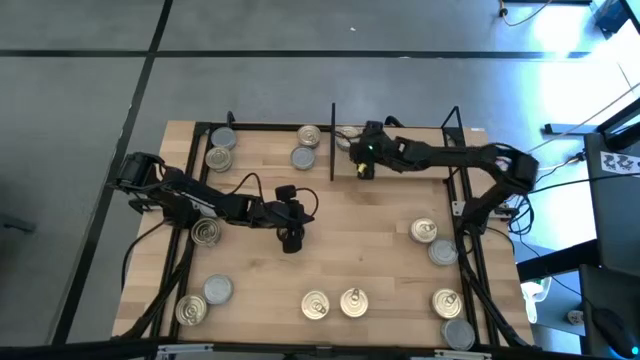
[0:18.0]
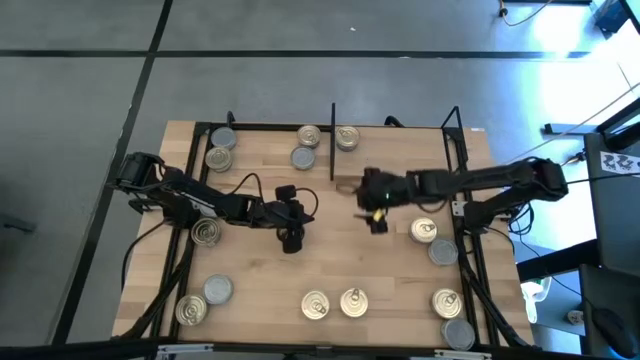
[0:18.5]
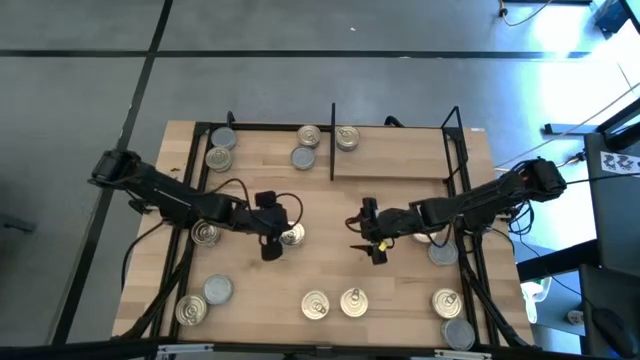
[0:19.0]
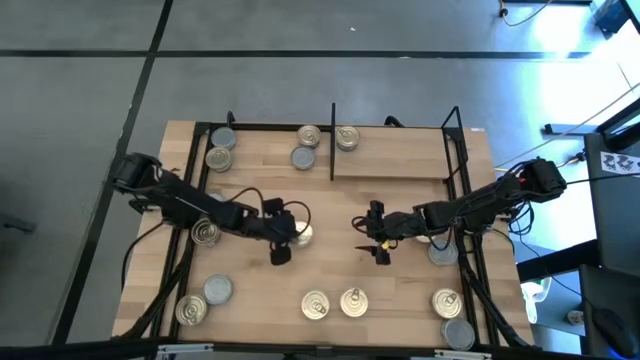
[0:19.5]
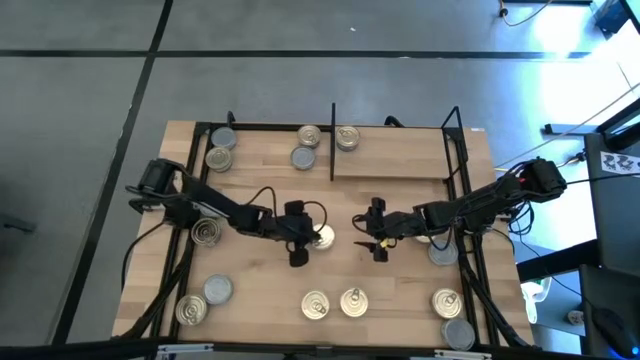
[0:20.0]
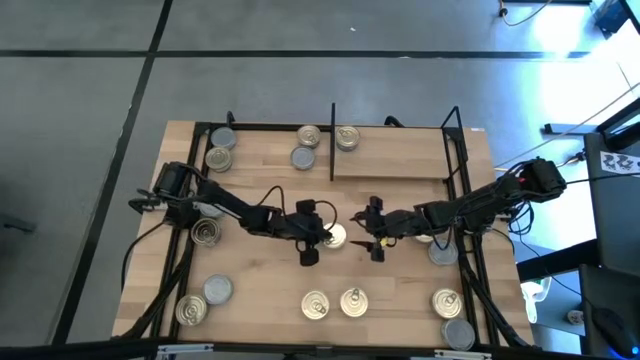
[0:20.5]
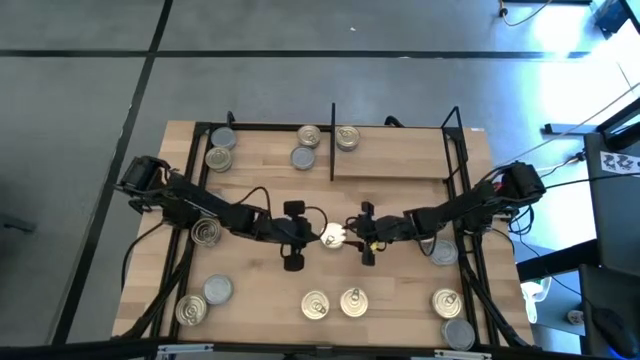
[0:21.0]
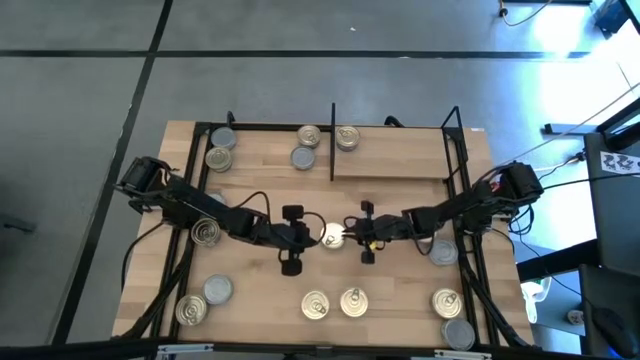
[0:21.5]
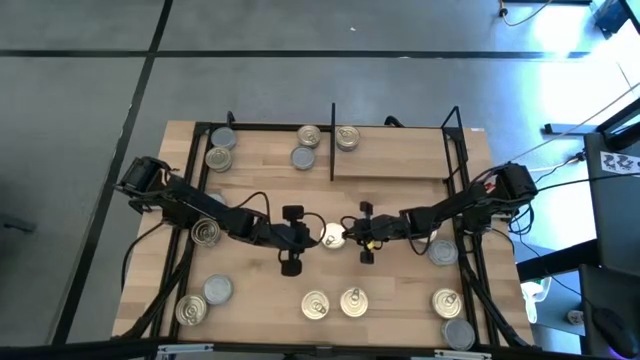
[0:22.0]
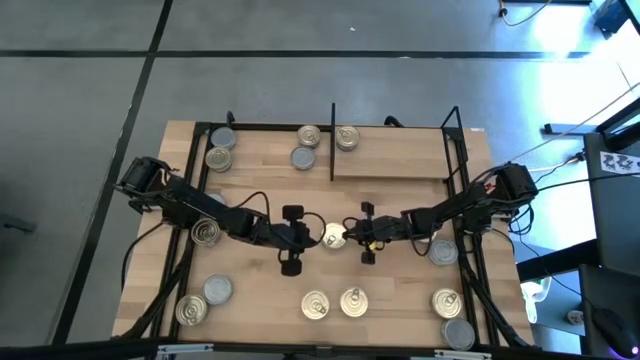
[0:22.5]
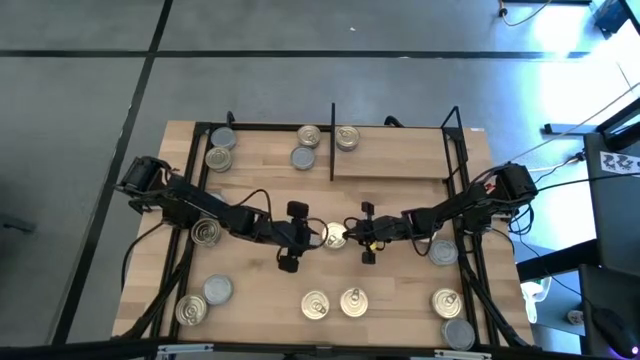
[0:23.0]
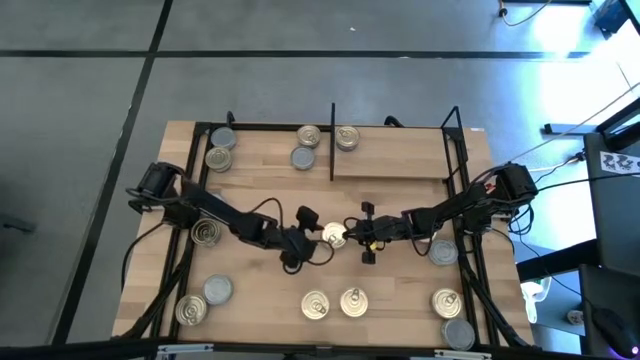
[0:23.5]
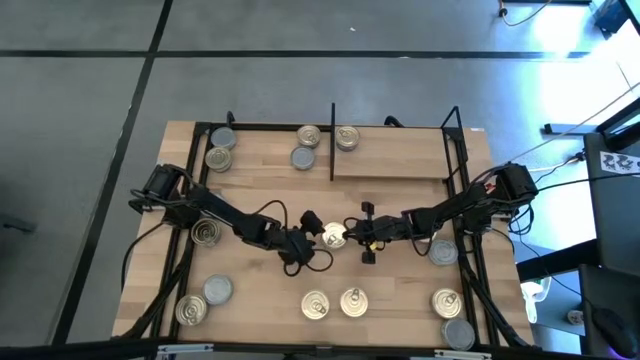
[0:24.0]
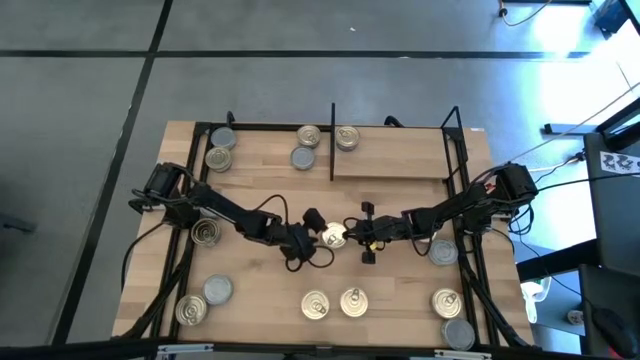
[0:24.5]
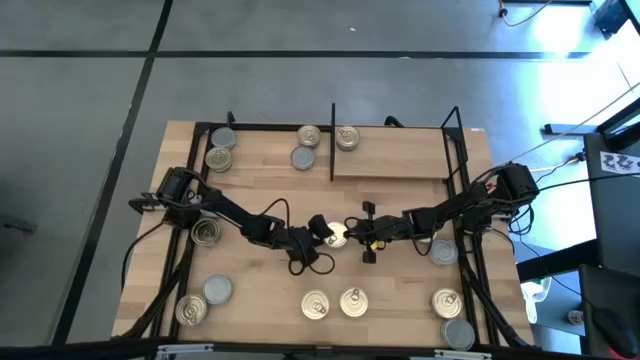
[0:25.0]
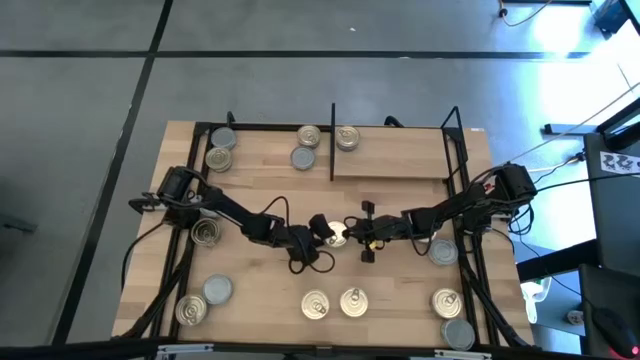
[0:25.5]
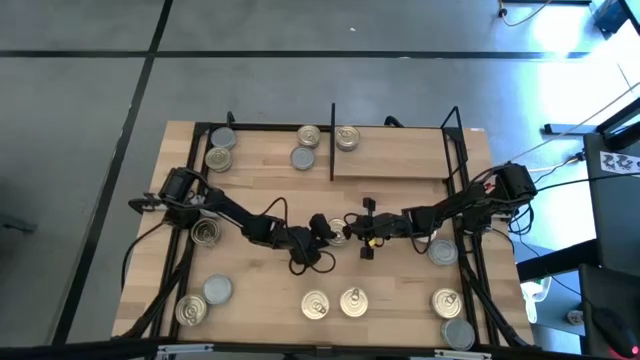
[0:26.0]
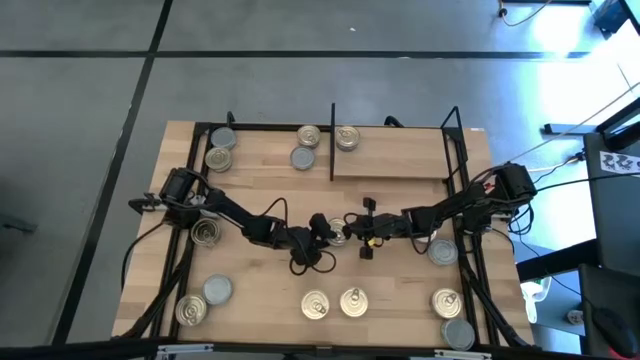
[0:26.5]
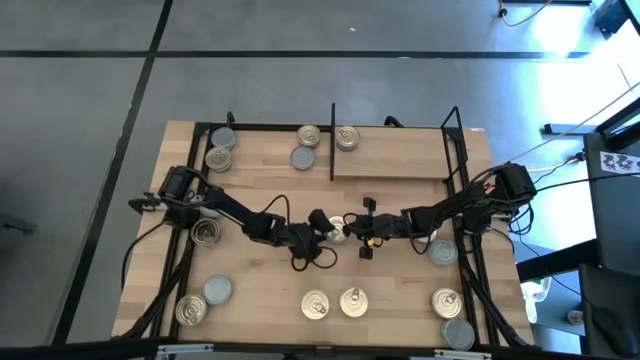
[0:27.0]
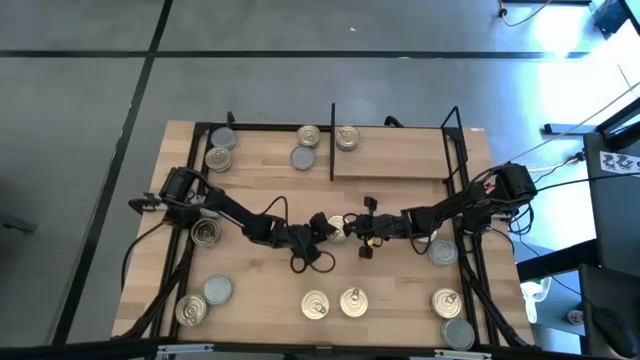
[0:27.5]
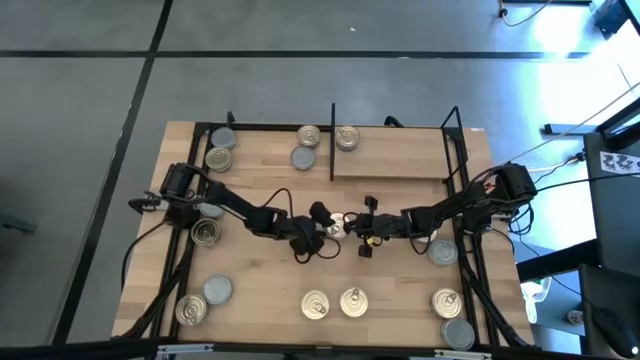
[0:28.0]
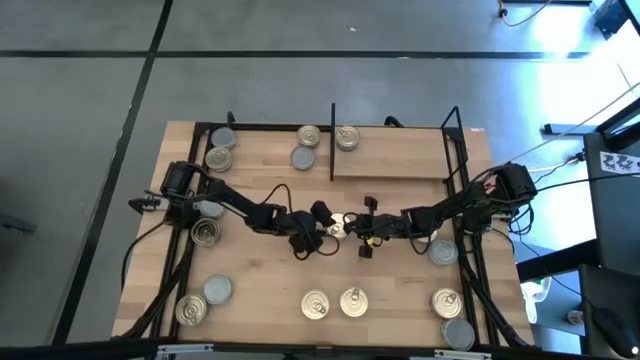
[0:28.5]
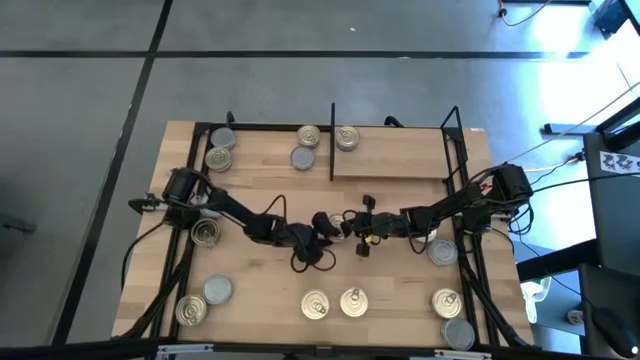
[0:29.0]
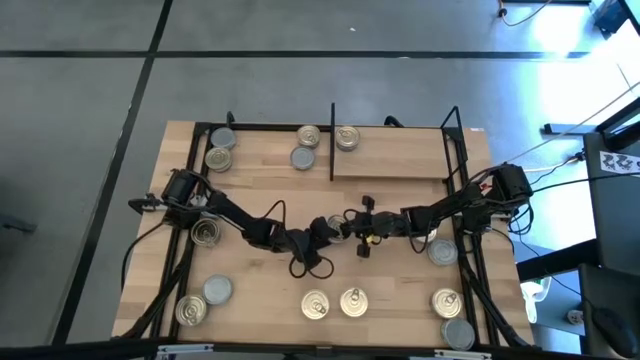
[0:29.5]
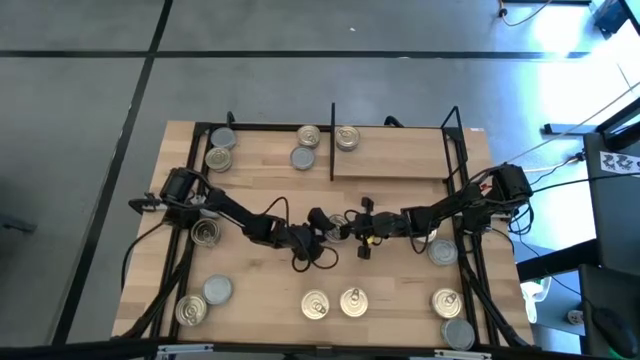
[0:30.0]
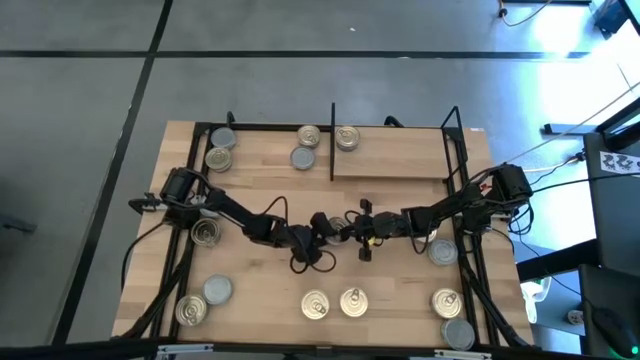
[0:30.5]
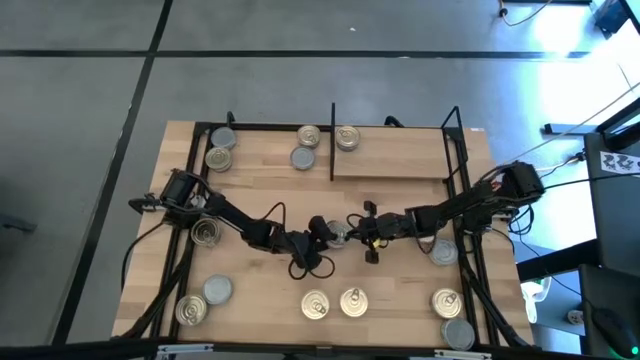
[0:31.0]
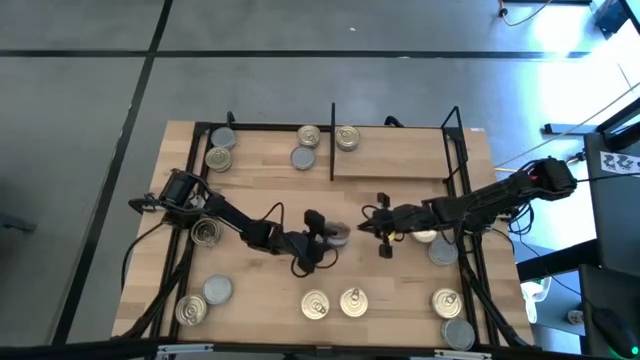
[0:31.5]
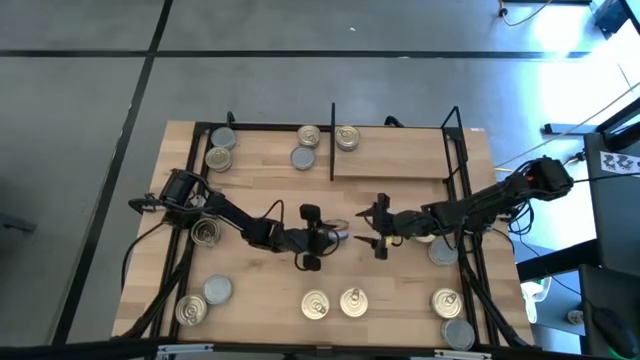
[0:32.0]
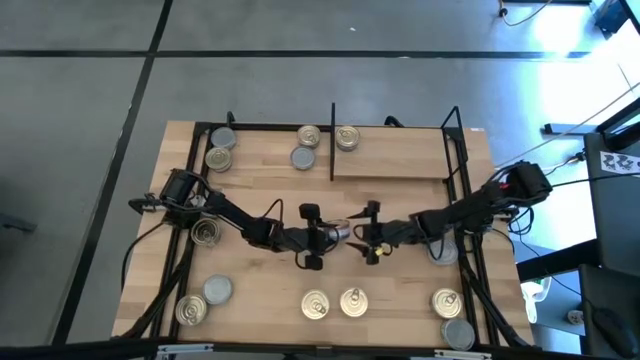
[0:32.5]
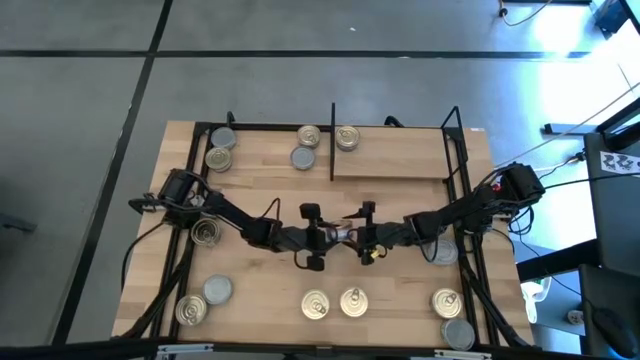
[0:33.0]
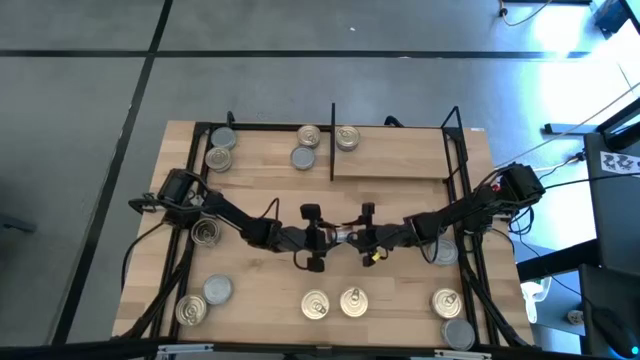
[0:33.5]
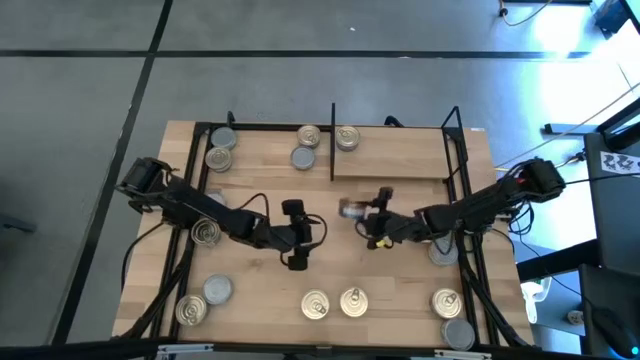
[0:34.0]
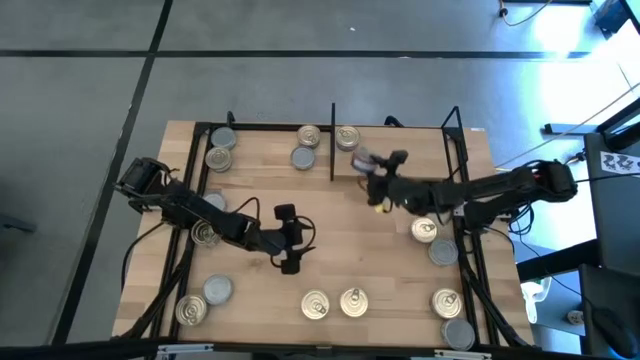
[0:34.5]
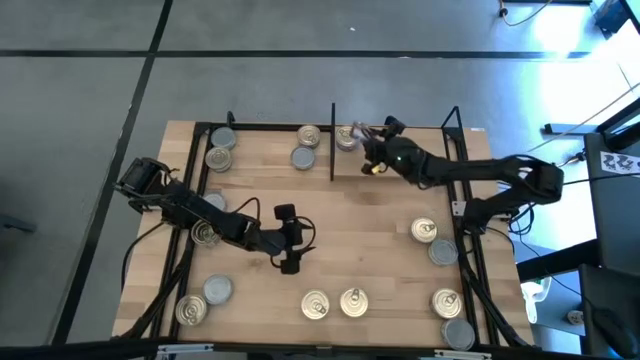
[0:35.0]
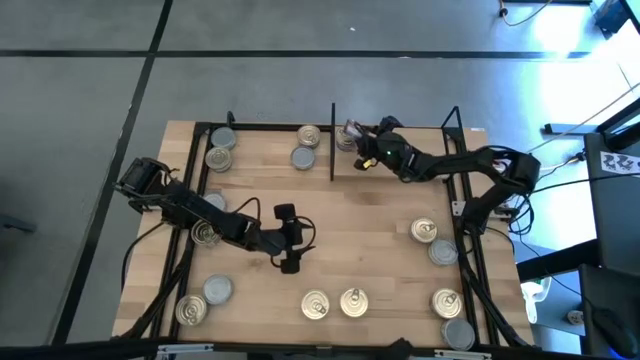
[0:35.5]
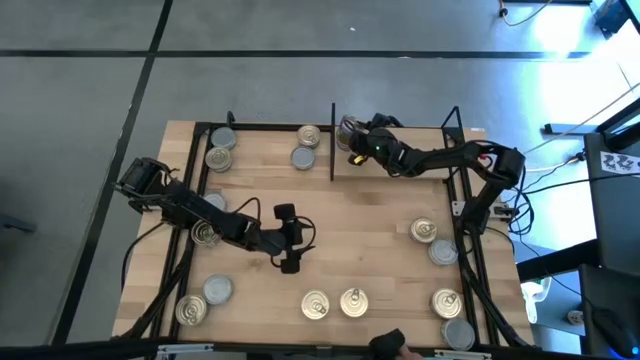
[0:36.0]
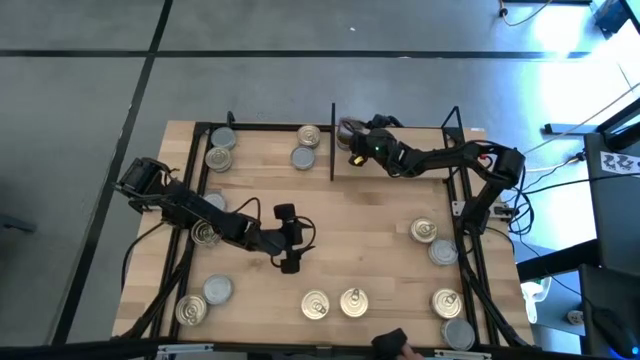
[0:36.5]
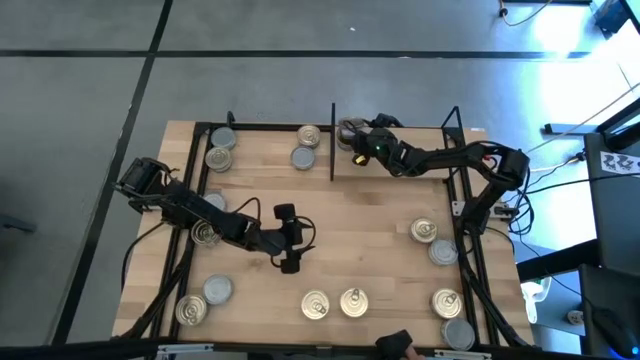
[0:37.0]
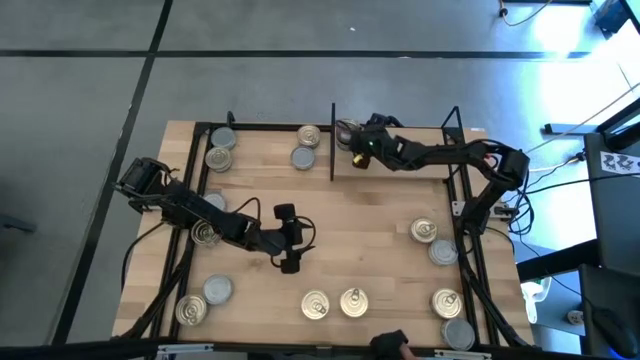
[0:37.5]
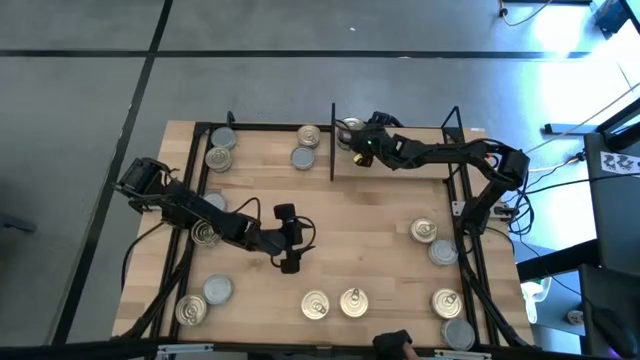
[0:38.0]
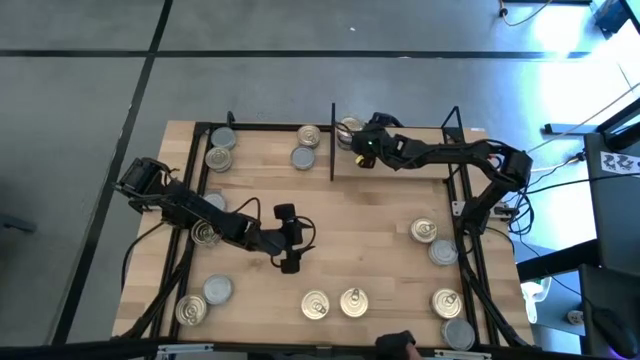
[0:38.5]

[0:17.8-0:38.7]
Task: Stack canned seafood by type on shelf
Stack the blue tuna can on top of the blue tuna can
